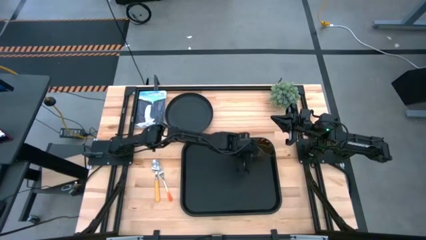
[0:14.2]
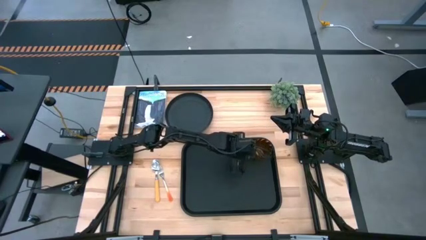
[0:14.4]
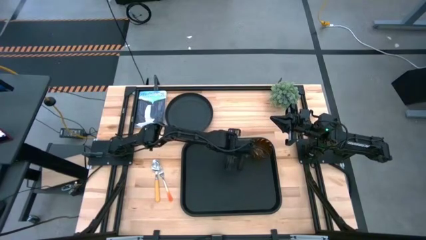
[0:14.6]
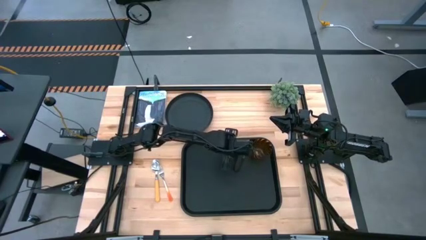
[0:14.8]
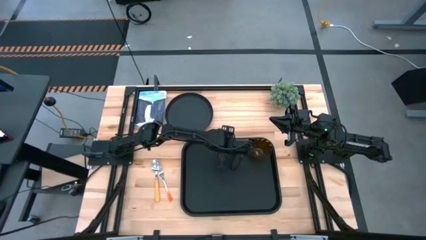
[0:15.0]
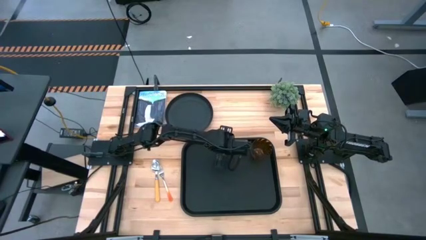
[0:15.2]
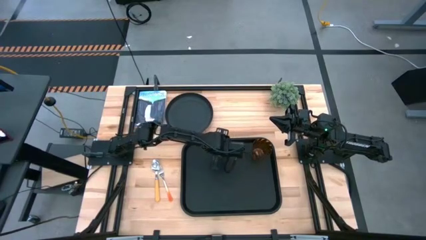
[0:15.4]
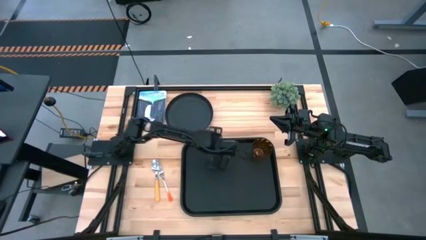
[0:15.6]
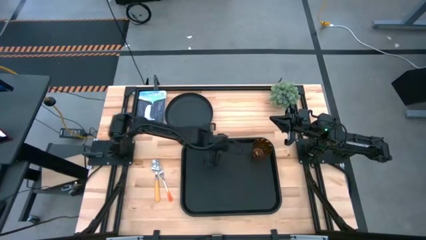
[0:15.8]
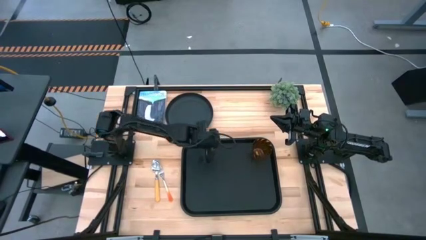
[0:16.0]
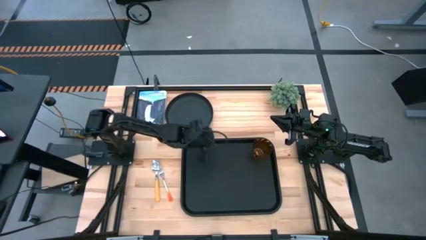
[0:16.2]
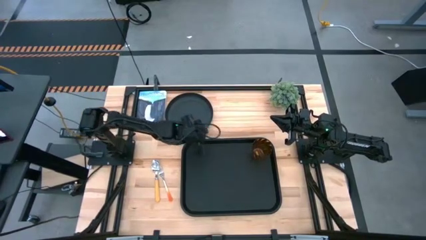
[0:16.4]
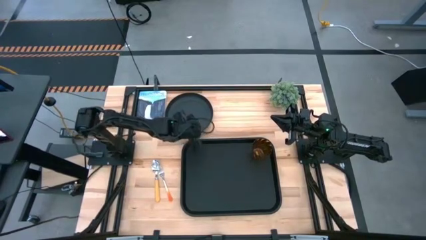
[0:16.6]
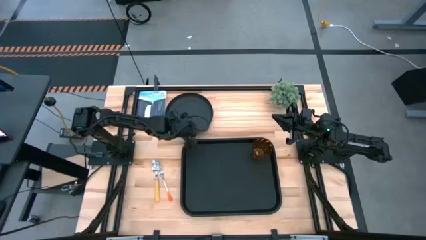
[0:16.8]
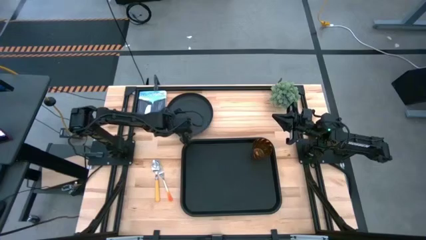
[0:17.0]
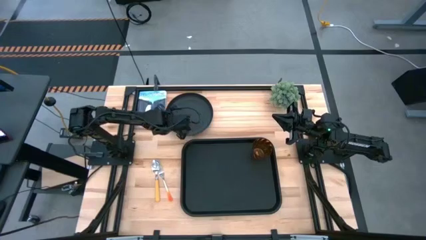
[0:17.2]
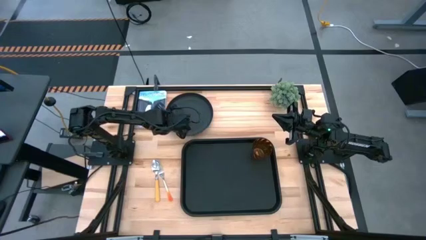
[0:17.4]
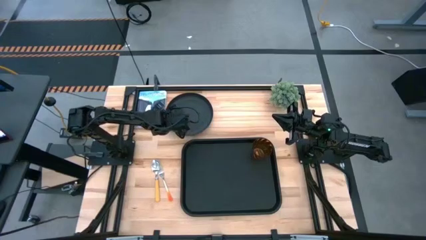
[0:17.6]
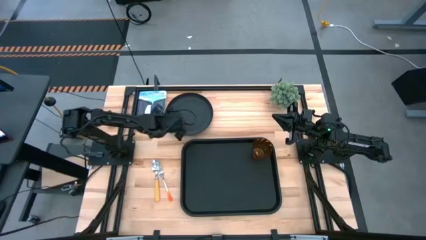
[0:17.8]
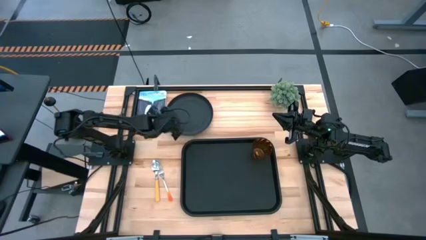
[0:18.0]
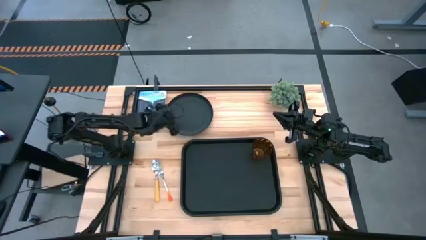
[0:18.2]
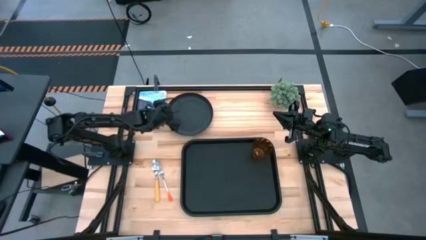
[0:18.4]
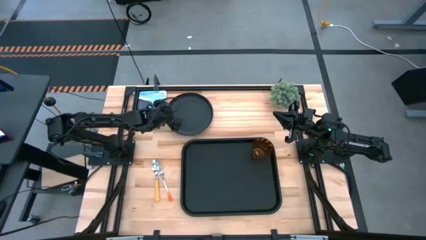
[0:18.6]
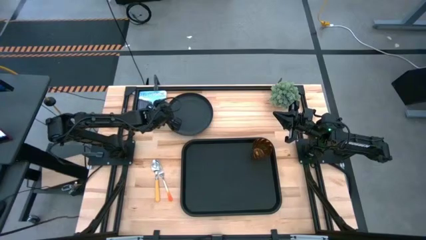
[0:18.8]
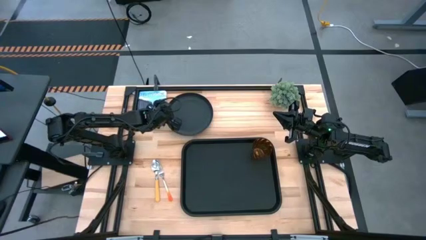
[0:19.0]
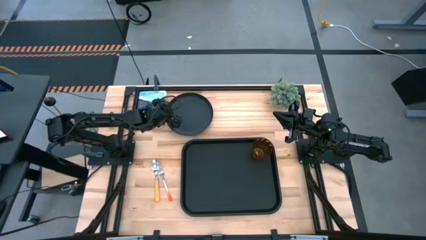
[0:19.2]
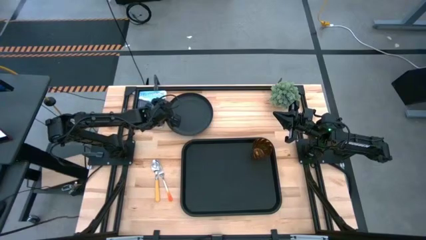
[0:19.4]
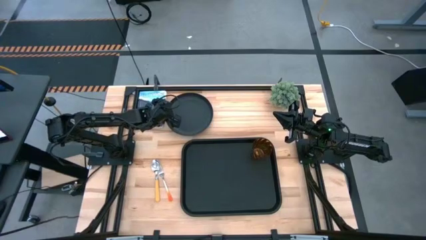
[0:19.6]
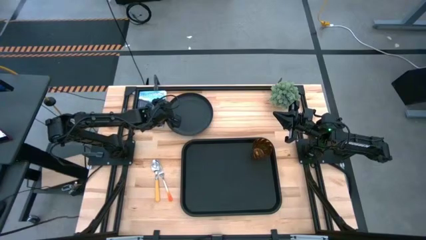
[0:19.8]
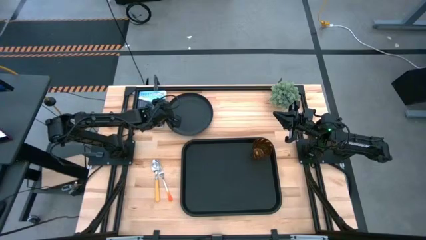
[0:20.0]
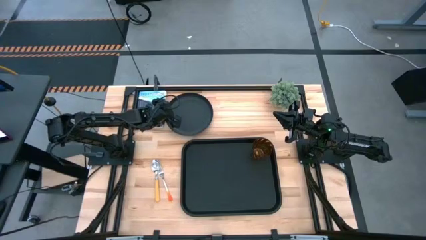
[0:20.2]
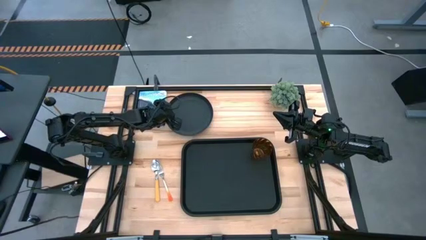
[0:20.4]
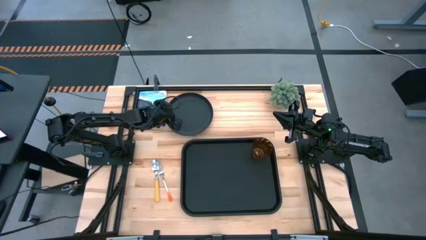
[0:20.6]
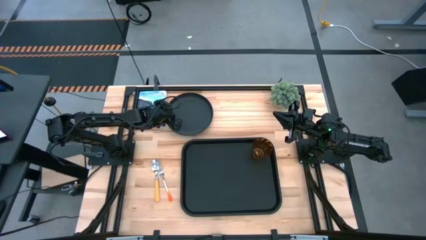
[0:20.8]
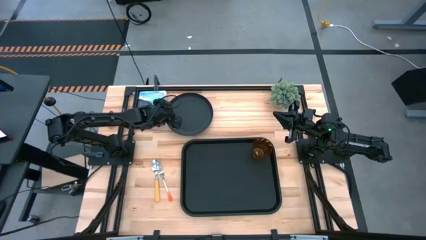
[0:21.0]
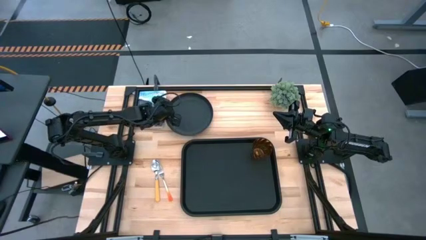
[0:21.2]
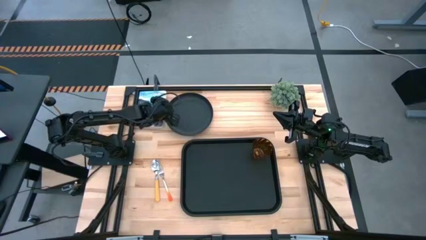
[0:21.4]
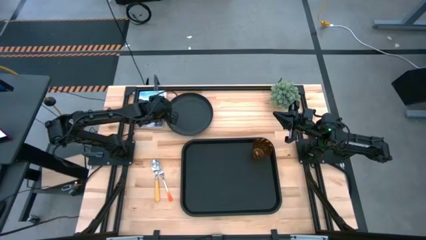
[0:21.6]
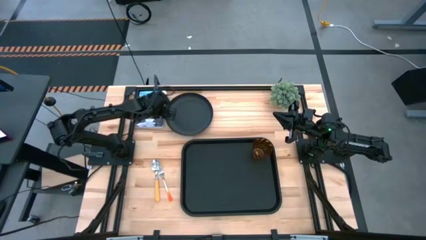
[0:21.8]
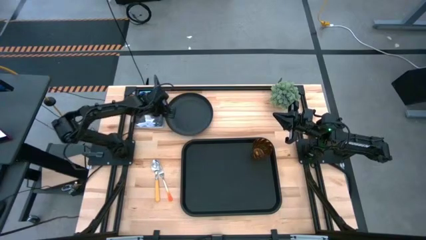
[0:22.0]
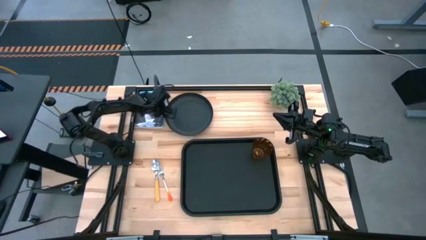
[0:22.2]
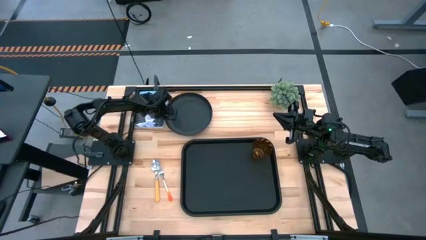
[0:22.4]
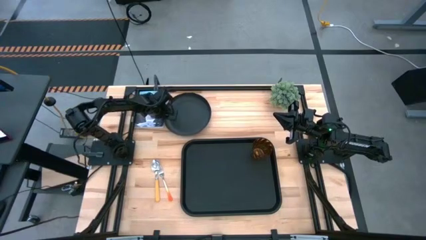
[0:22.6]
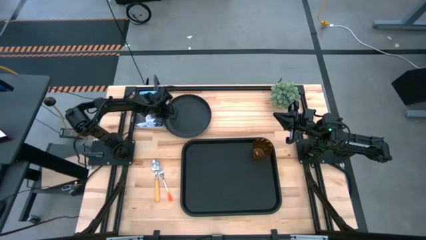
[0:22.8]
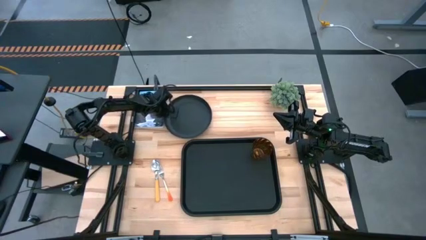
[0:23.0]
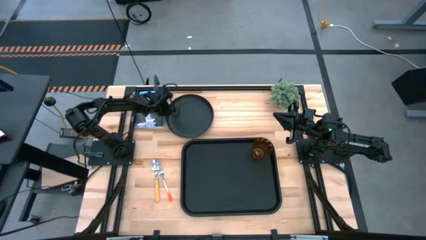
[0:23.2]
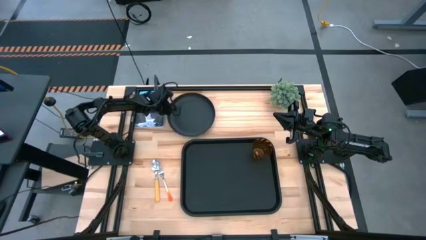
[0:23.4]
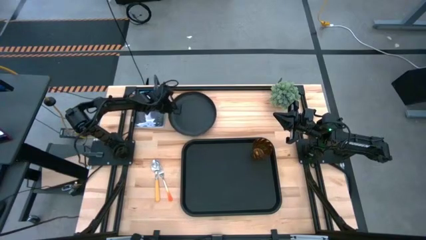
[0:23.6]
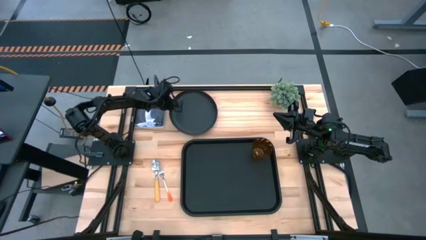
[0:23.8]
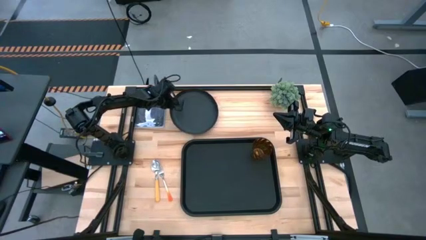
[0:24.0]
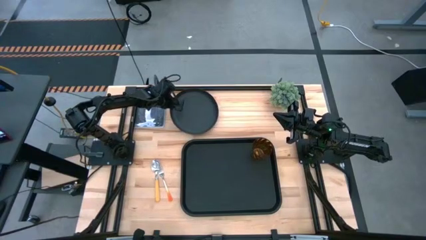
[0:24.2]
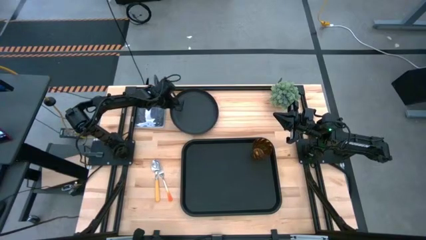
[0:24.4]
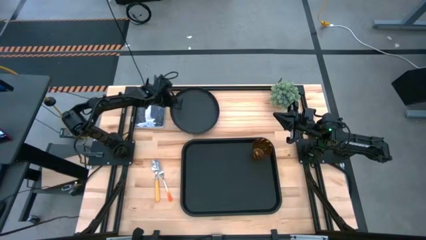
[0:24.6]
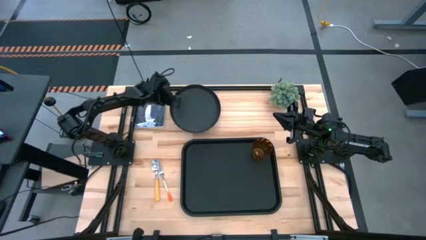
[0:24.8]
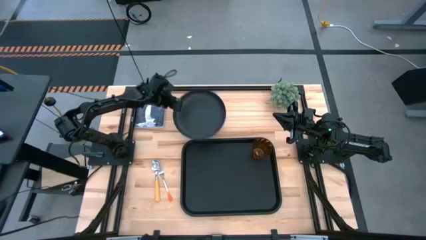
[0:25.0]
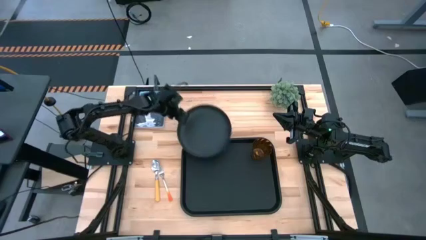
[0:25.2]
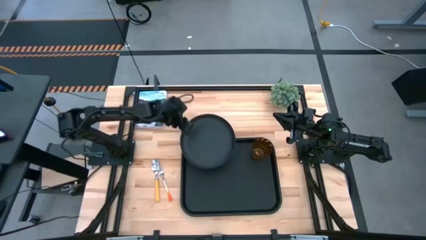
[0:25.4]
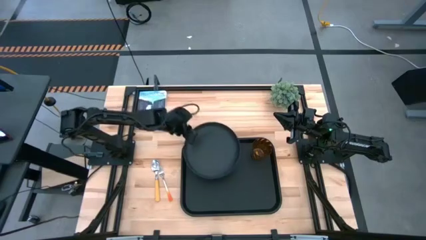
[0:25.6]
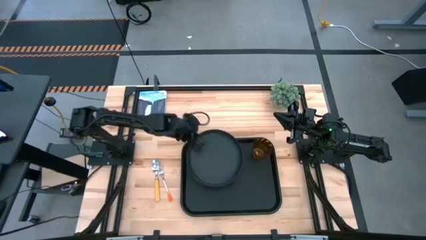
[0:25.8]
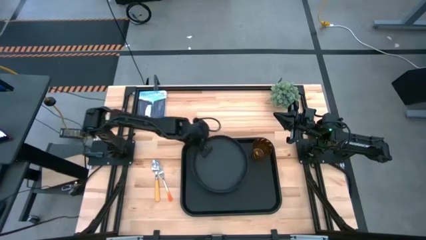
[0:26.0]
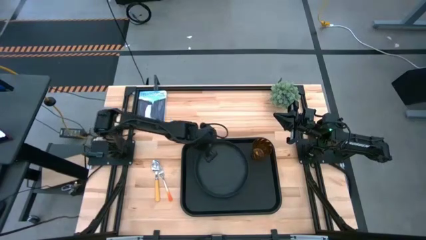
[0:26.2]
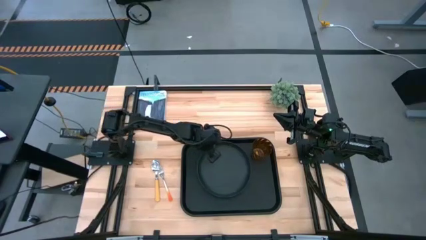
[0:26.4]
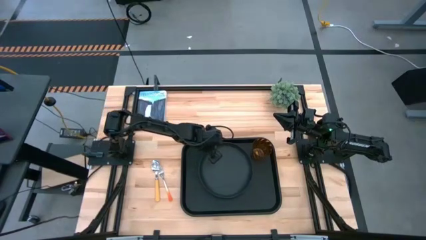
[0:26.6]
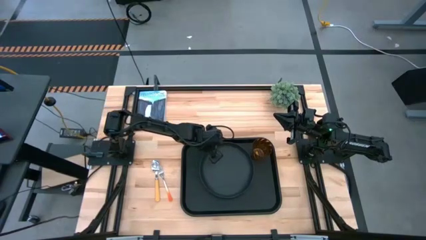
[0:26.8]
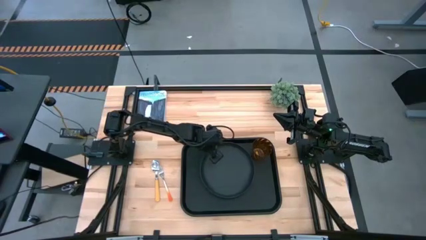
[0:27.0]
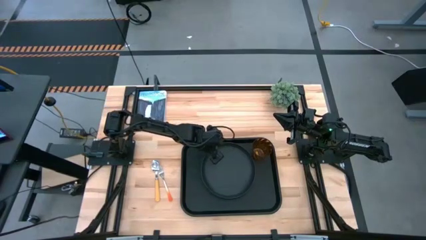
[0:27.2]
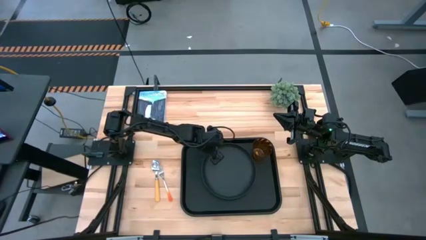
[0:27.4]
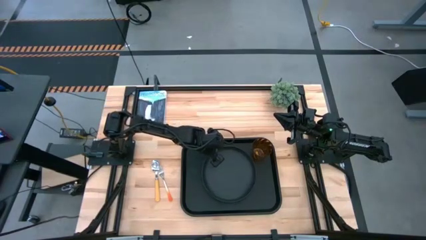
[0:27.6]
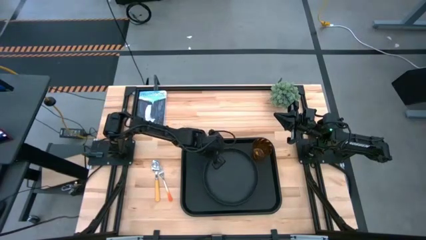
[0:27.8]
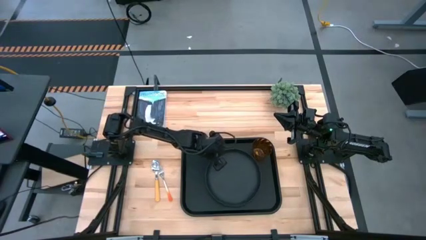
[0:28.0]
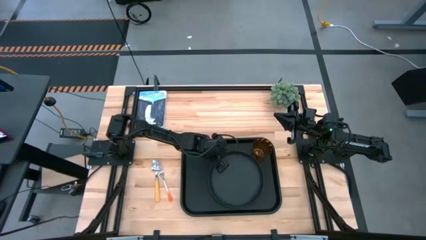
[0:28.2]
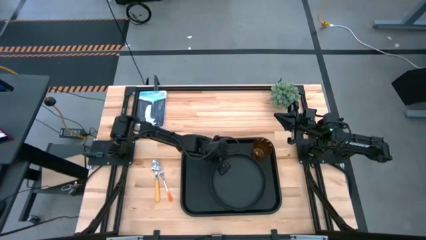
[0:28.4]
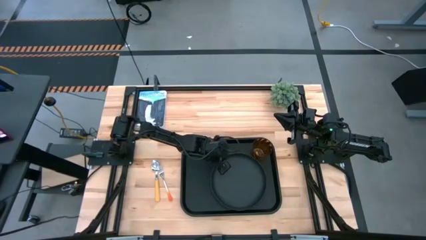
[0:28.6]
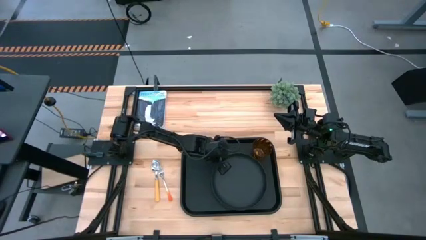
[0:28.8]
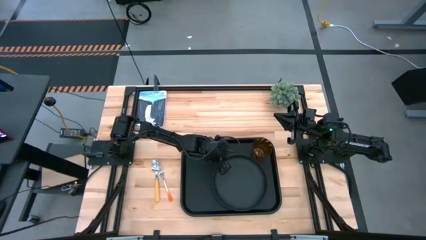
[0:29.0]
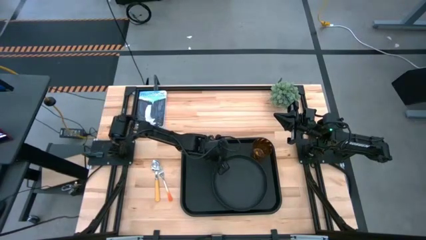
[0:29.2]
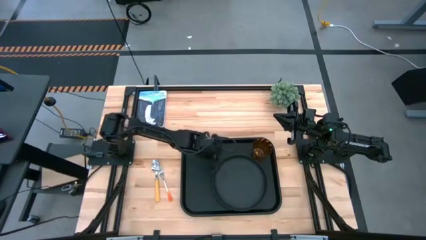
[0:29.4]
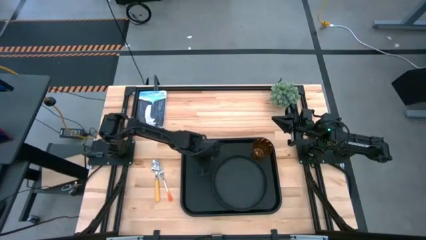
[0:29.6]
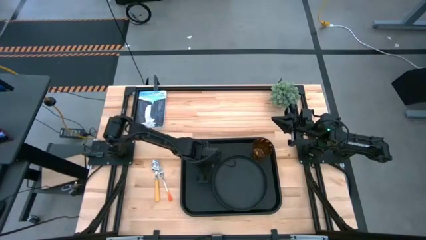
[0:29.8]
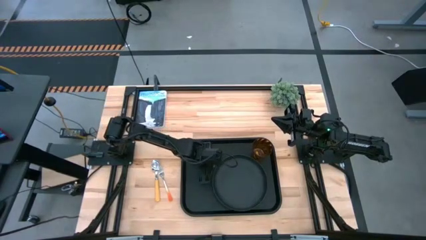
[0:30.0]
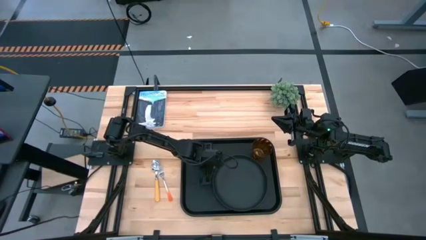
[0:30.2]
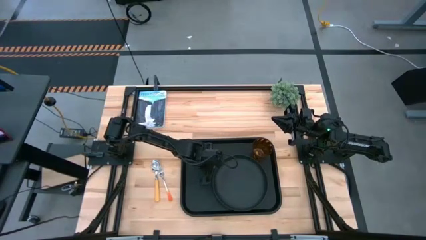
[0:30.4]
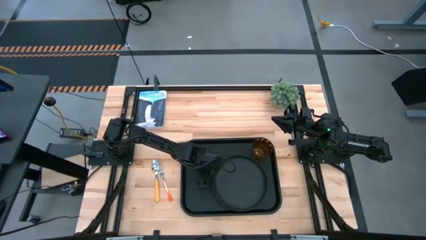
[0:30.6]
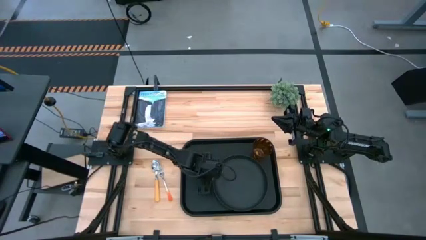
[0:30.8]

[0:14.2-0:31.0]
Task: Pick and place plate/cup/fork/spoon on tray
Put the plate on the serving tray
